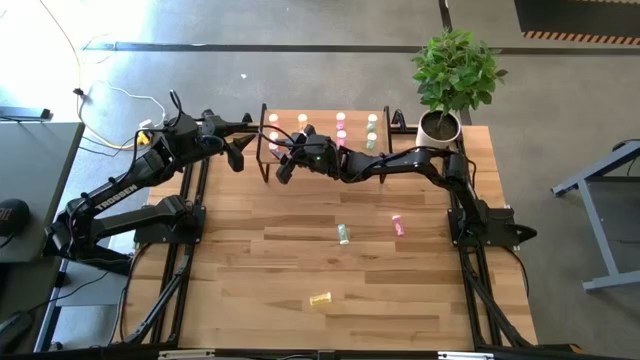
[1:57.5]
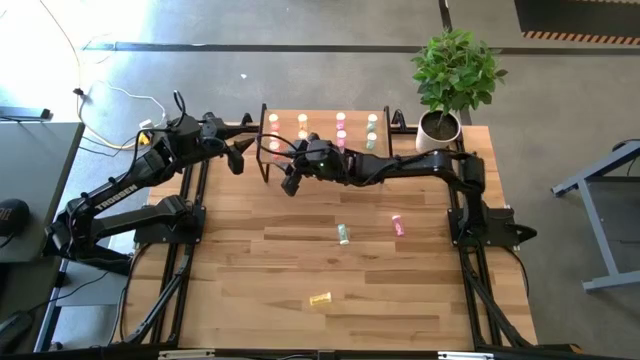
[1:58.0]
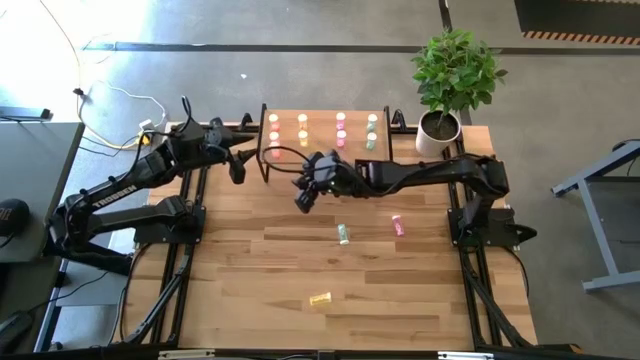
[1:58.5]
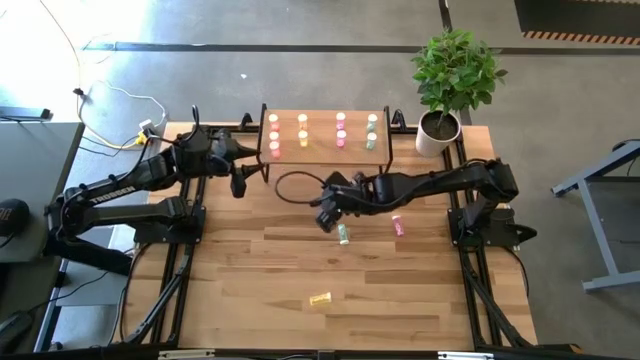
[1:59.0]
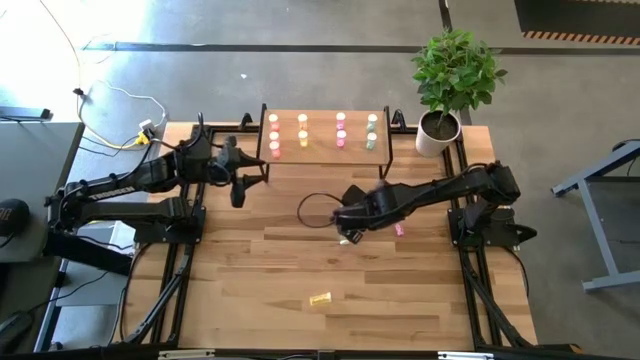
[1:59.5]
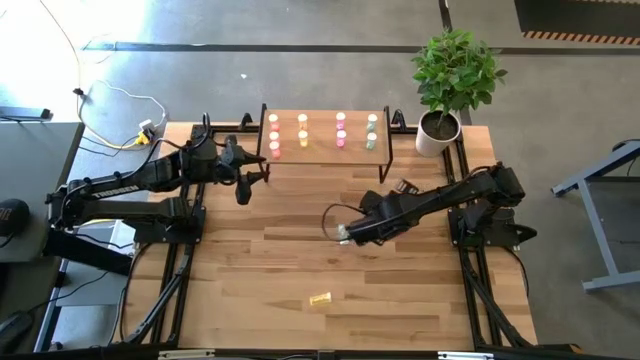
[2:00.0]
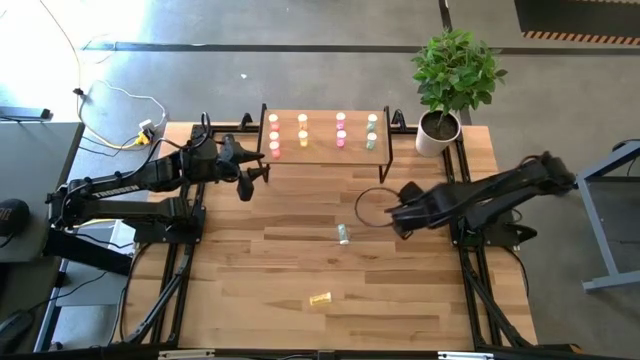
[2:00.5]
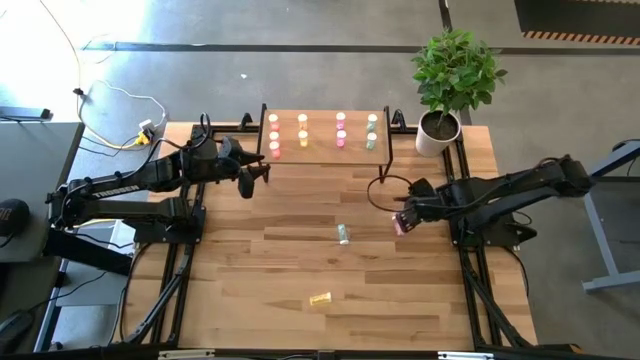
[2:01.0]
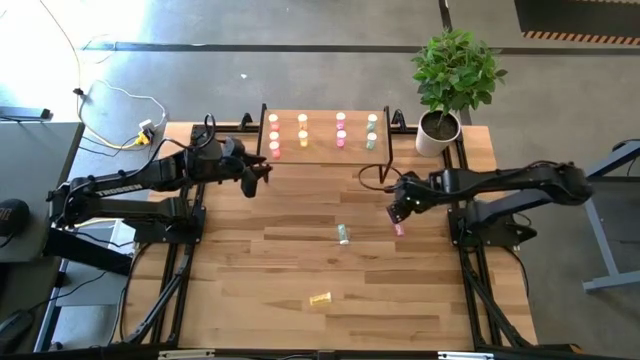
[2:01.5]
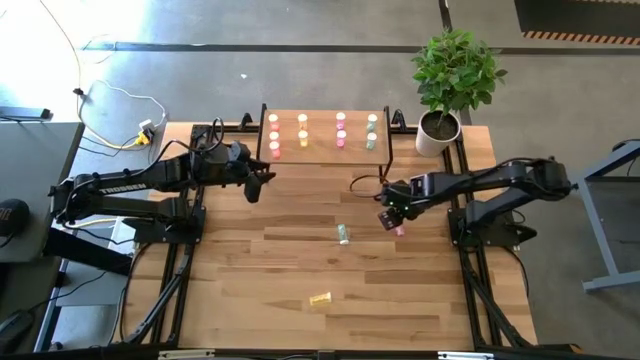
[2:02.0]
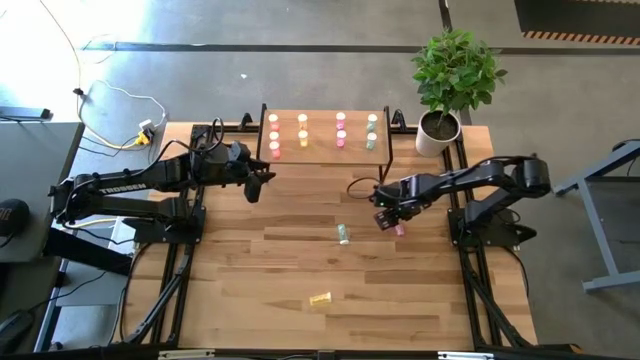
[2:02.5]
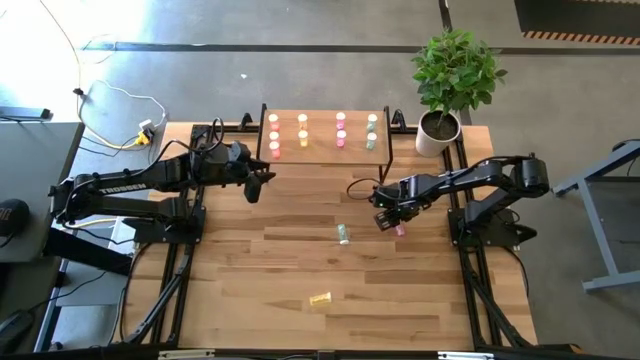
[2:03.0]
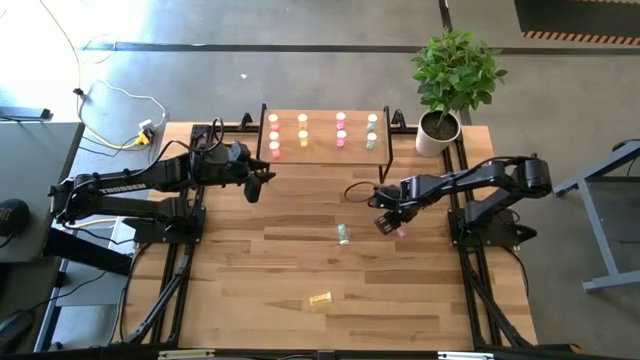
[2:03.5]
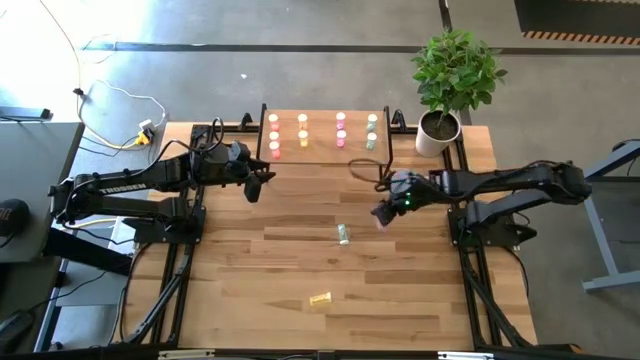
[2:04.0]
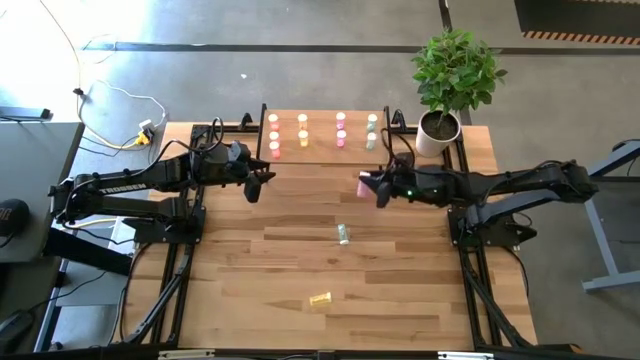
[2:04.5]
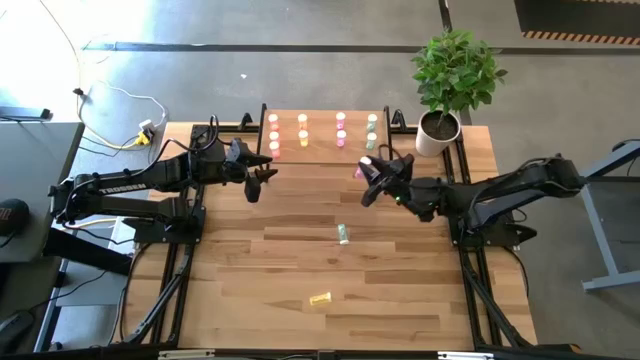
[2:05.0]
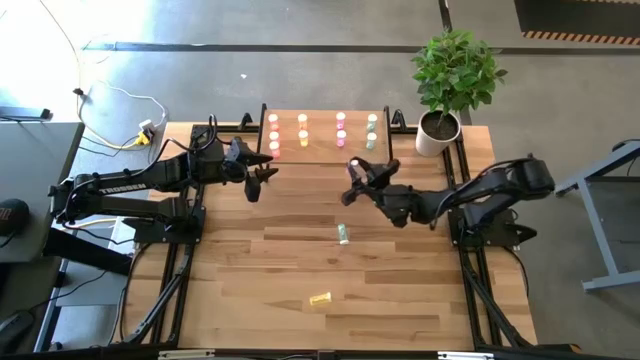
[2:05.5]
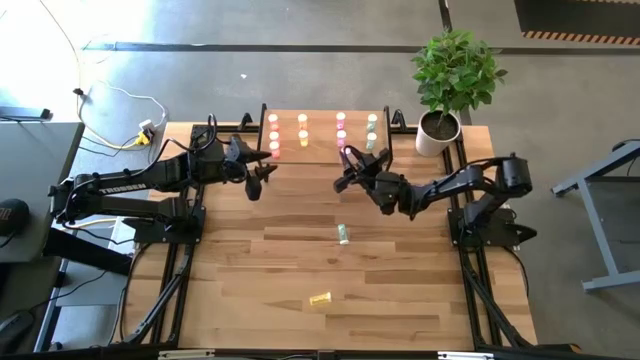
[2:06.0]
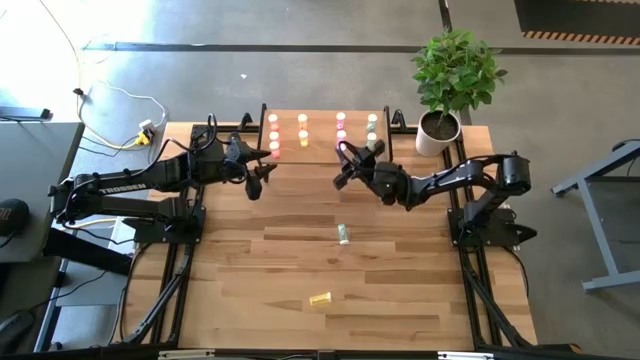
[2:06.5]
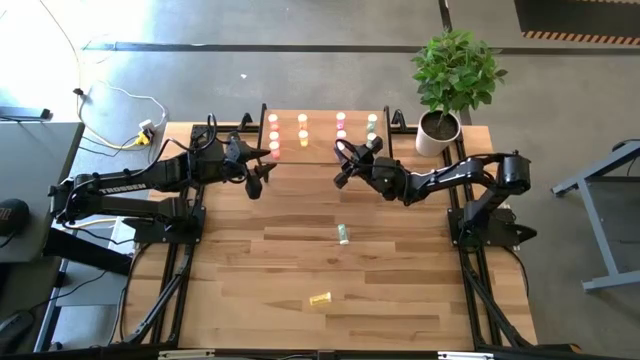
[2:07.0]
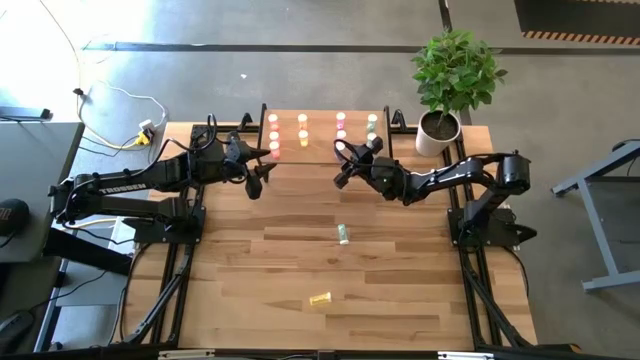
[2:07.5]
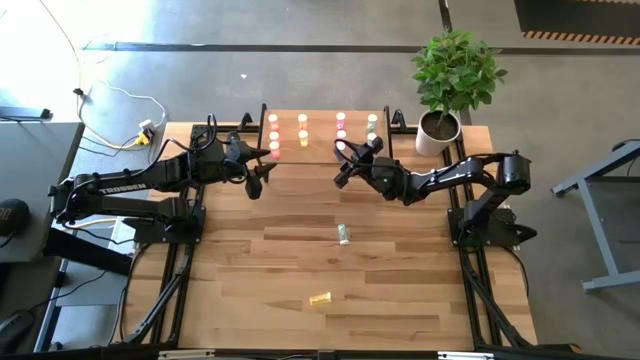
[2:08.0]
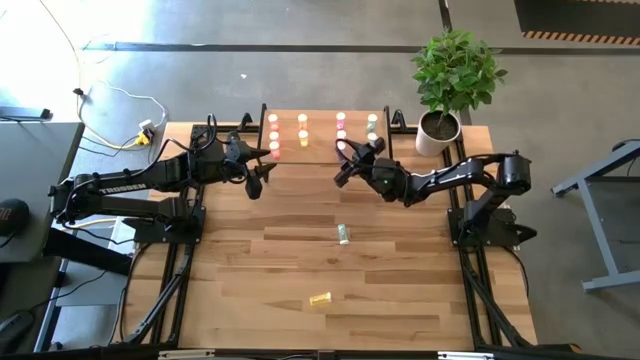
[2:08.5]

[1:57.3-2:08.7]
Task: Pick and place medicine bottles onto shelf by color
Put the violet pill bottle on the shelf aligned with the other violet pill bottles

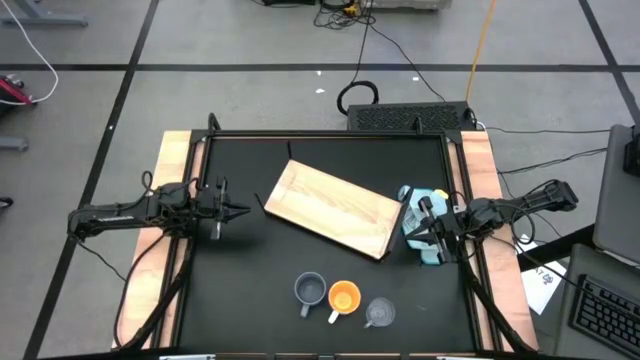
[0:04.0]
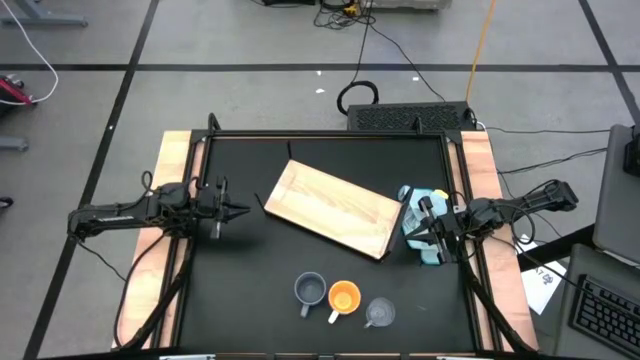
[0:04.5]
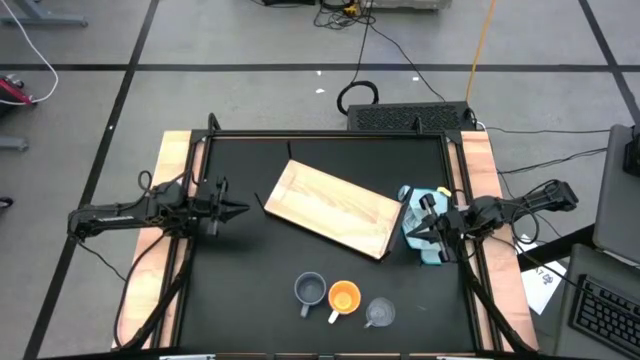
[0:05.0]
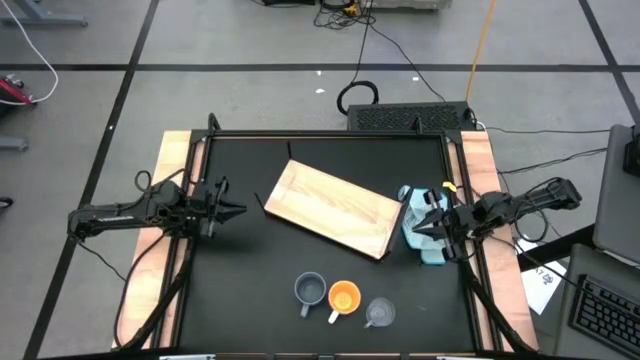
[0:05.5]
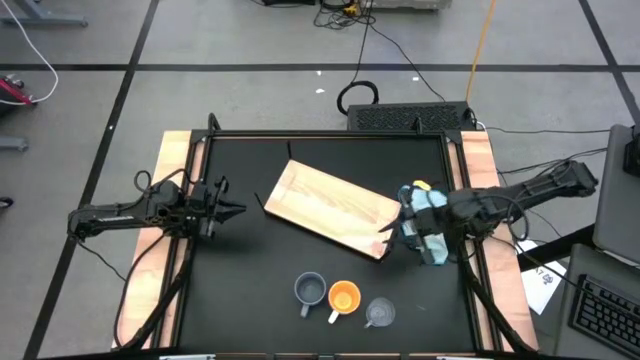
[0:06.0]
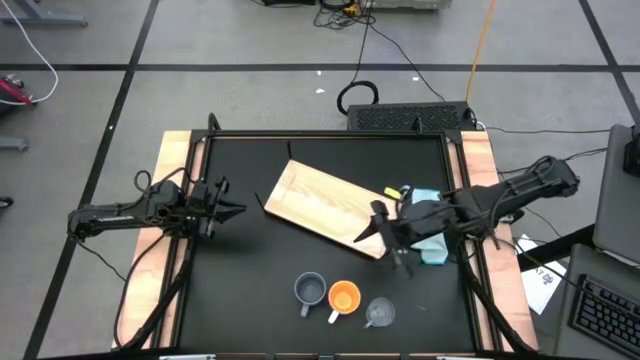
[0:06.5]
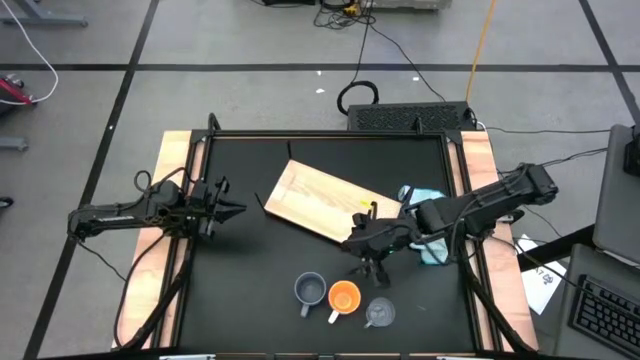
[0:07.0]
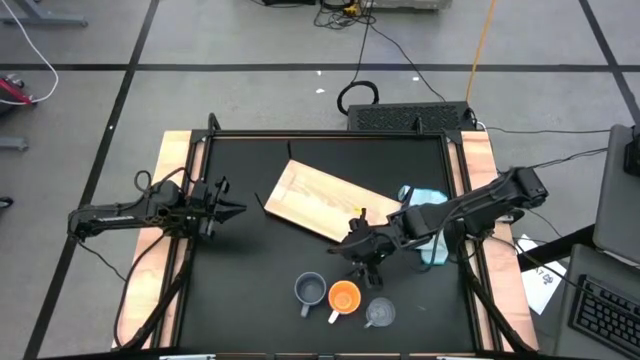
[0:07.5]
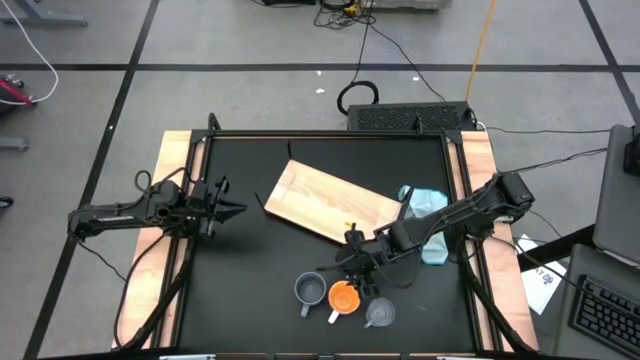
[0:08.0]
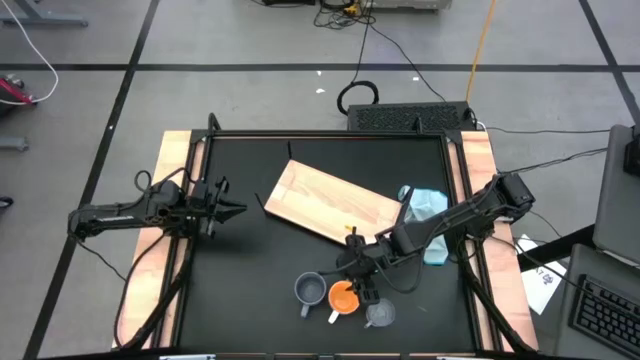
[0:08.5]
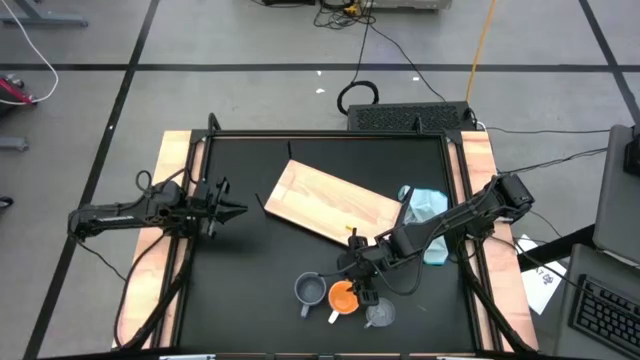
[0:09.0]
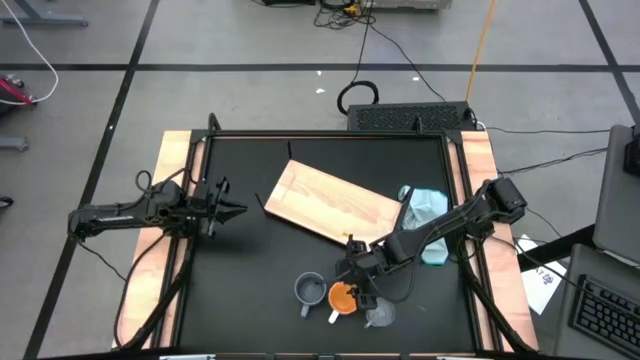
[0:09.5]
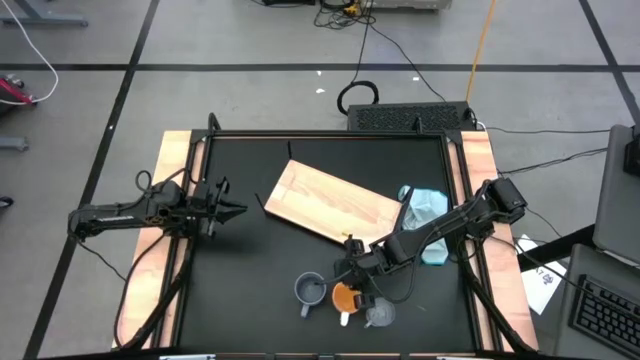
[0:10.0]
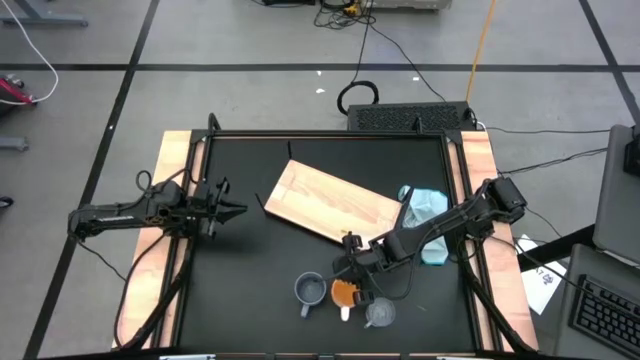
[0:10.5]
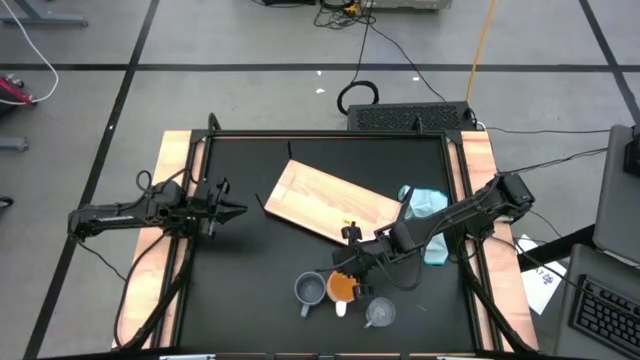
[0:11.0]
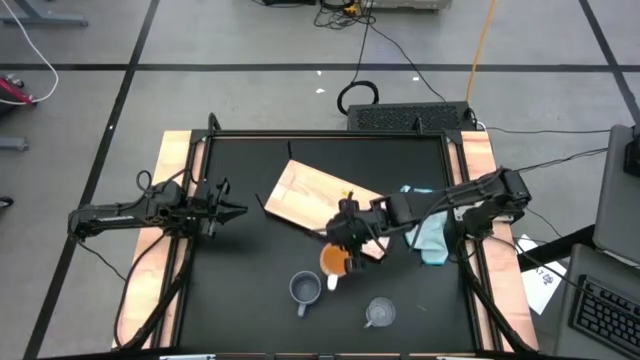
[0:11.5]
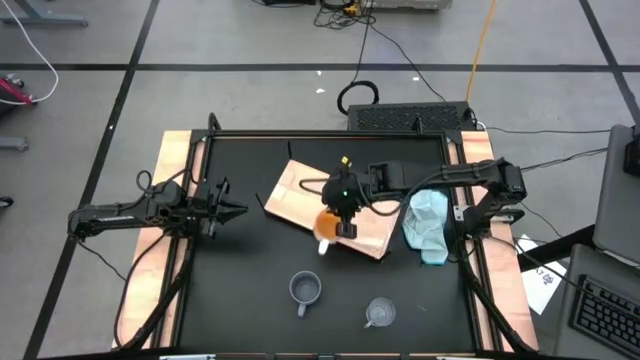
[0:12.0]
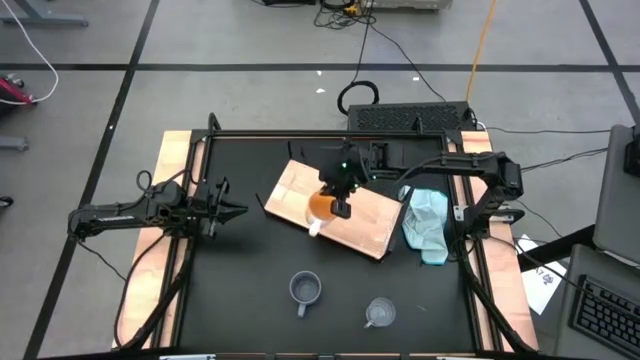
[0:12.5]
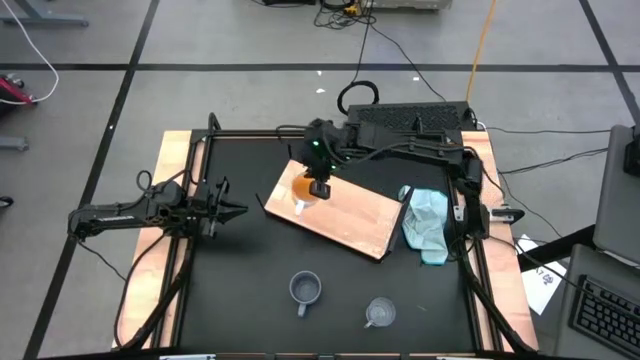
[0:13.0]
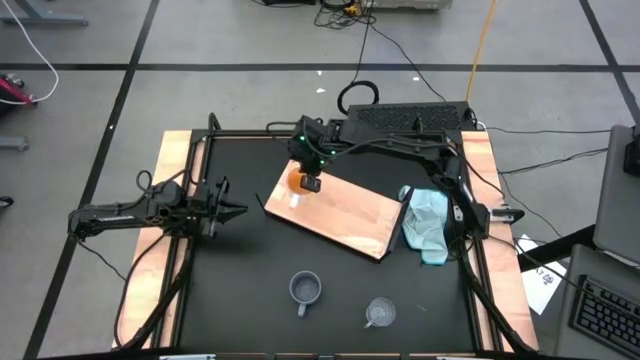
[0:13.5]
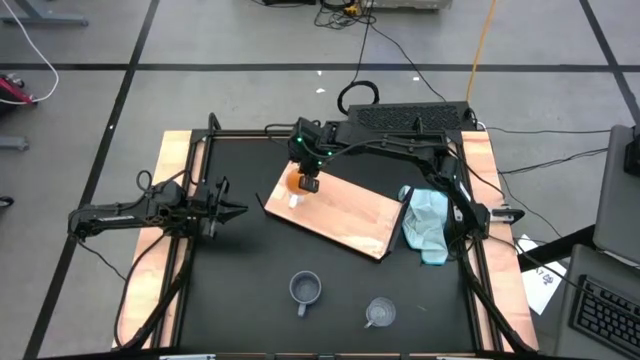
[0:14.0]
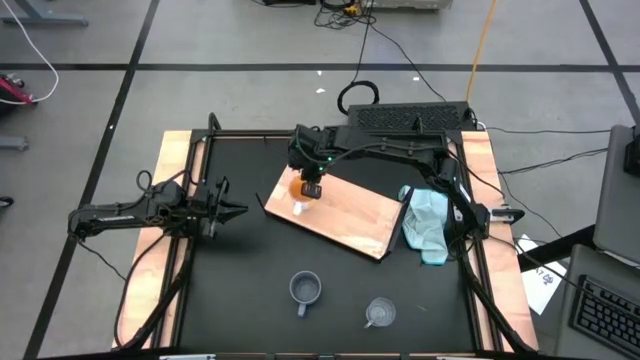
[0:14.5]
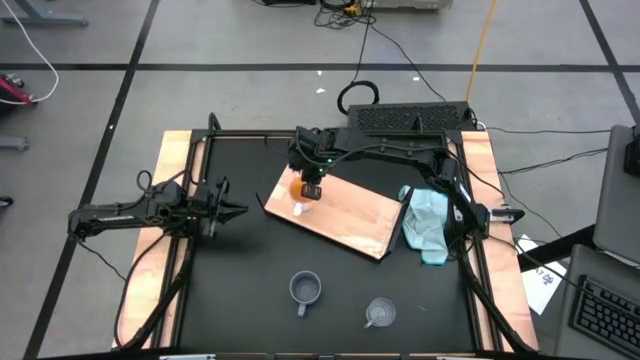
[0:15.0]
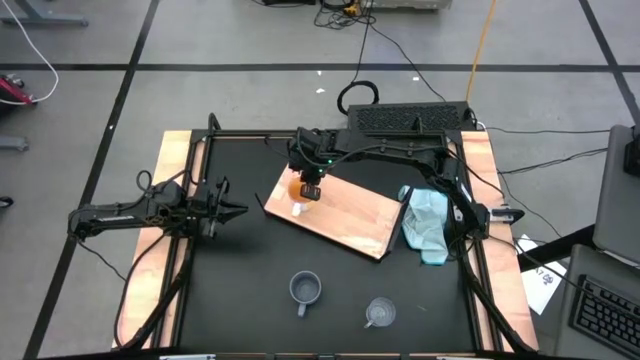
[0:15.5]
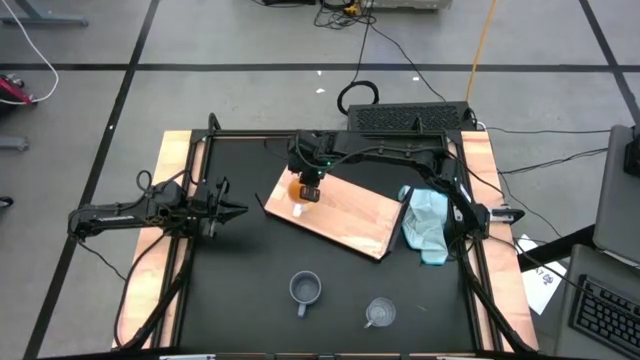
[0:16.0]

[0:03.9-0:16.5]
Task: Stack small to large cups/mugs on shelf
Put the yellow mug on the shelf
